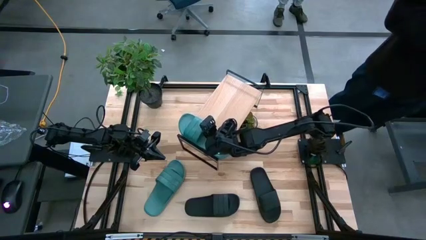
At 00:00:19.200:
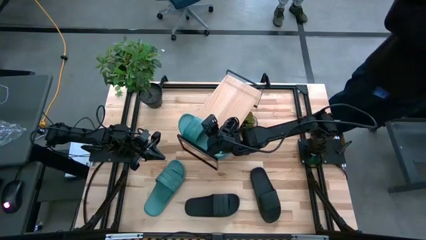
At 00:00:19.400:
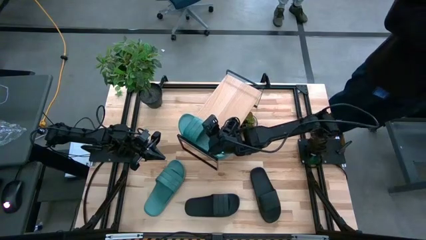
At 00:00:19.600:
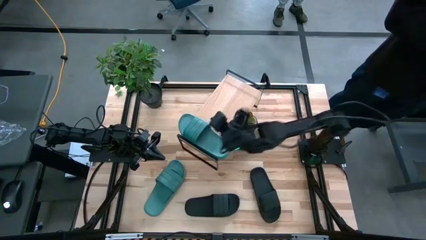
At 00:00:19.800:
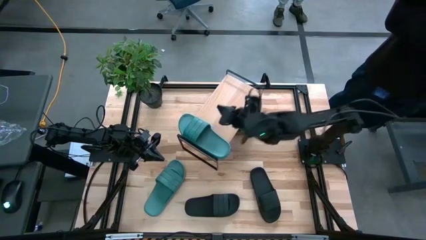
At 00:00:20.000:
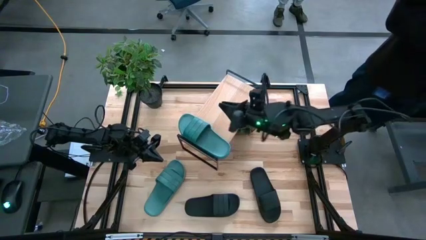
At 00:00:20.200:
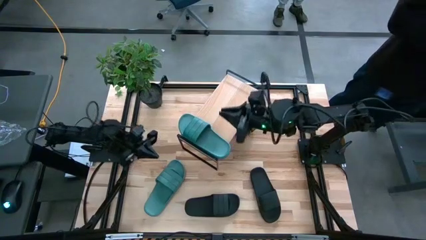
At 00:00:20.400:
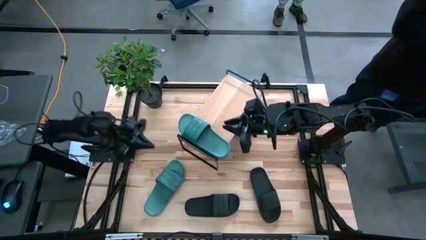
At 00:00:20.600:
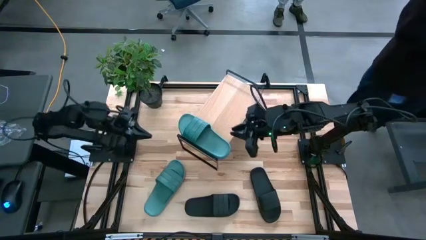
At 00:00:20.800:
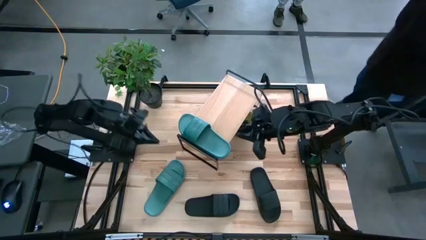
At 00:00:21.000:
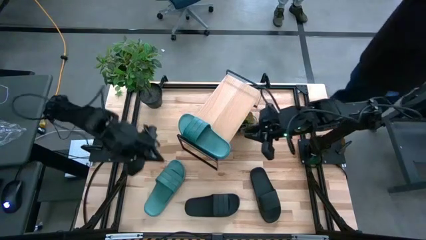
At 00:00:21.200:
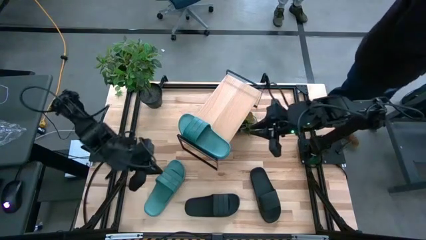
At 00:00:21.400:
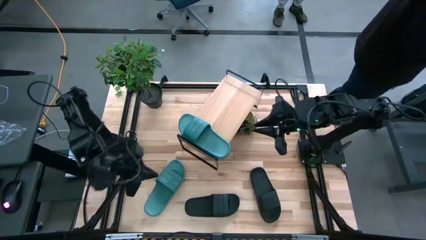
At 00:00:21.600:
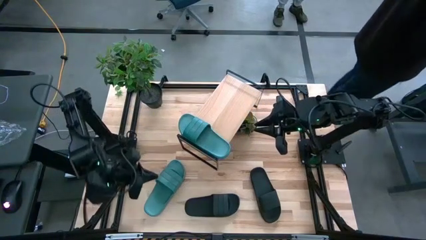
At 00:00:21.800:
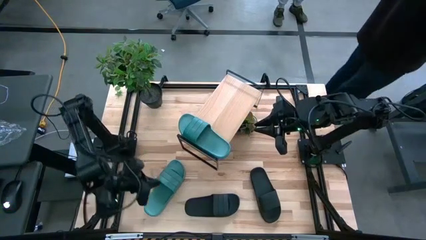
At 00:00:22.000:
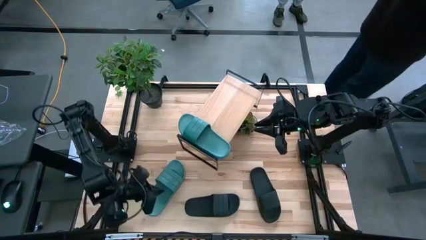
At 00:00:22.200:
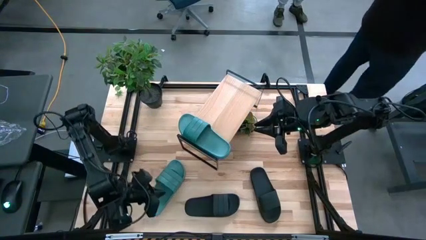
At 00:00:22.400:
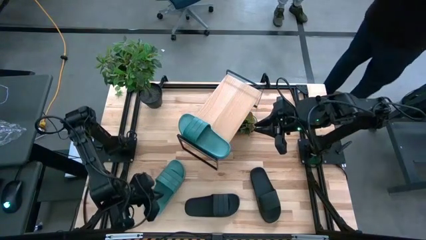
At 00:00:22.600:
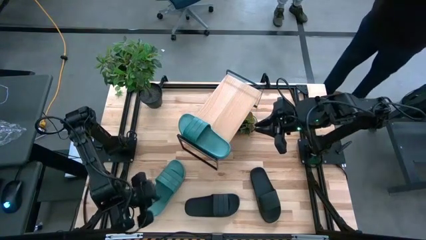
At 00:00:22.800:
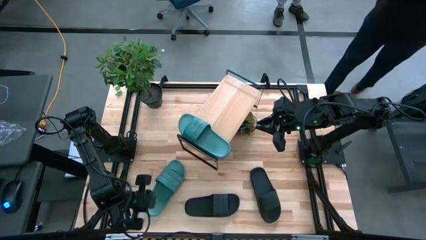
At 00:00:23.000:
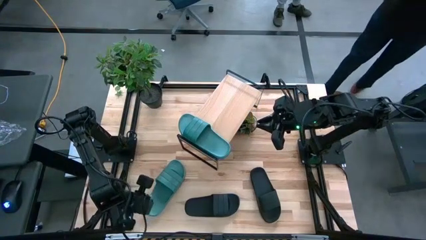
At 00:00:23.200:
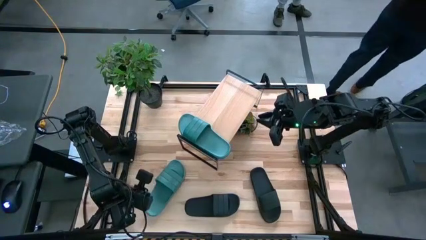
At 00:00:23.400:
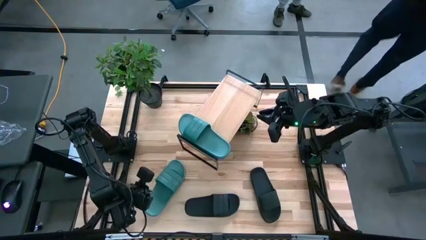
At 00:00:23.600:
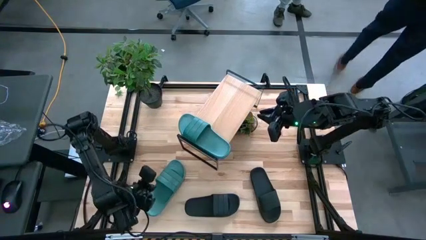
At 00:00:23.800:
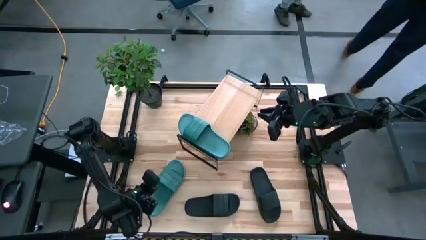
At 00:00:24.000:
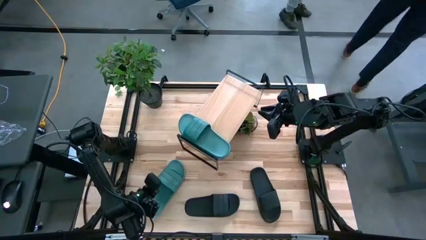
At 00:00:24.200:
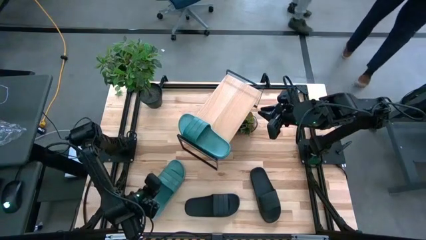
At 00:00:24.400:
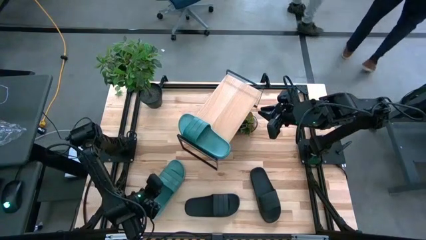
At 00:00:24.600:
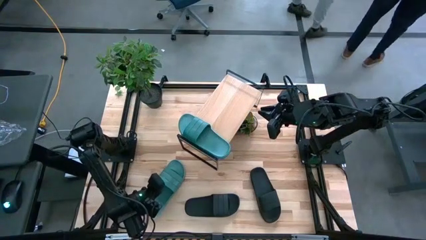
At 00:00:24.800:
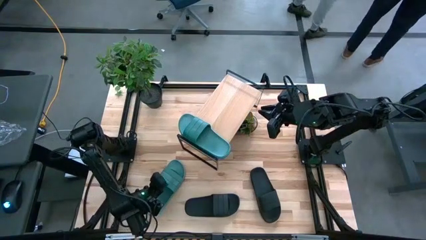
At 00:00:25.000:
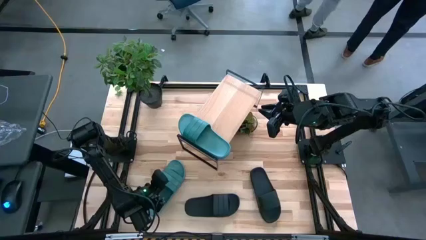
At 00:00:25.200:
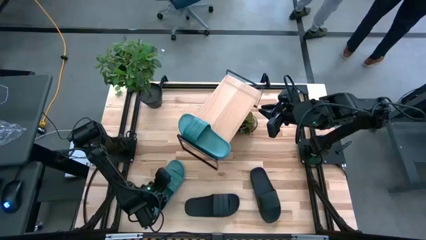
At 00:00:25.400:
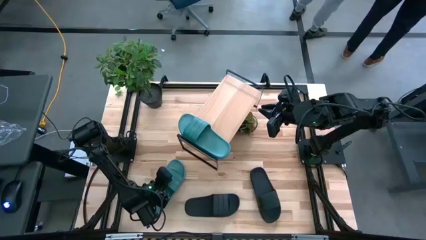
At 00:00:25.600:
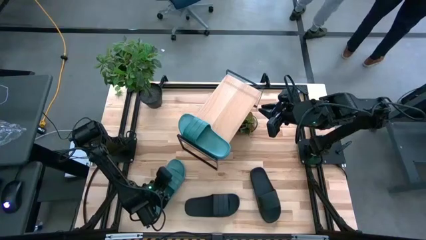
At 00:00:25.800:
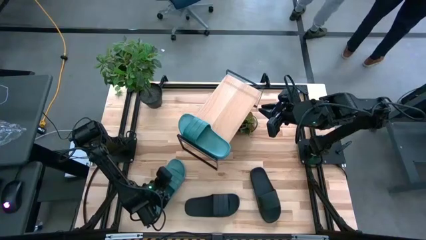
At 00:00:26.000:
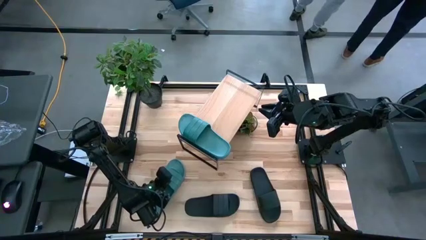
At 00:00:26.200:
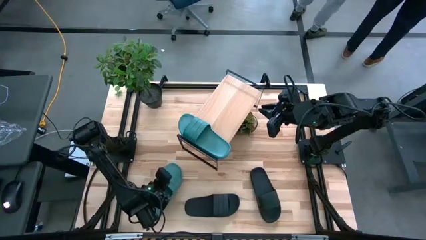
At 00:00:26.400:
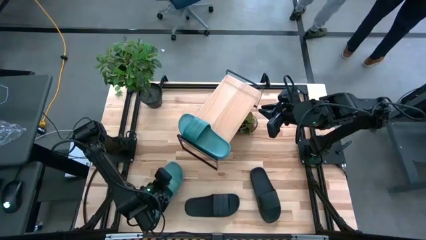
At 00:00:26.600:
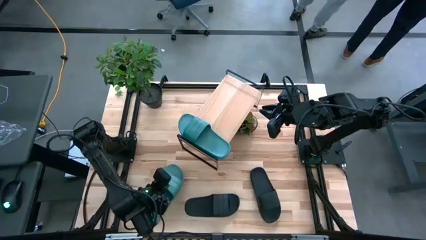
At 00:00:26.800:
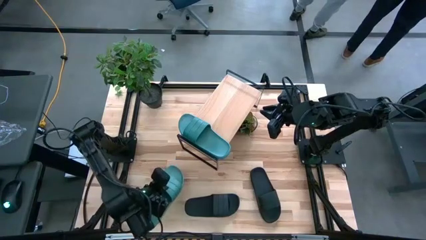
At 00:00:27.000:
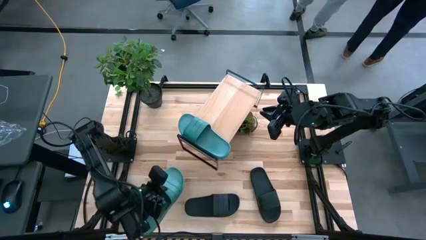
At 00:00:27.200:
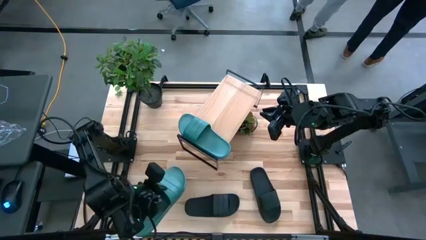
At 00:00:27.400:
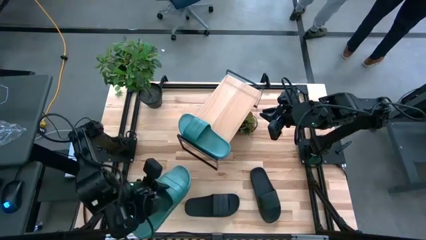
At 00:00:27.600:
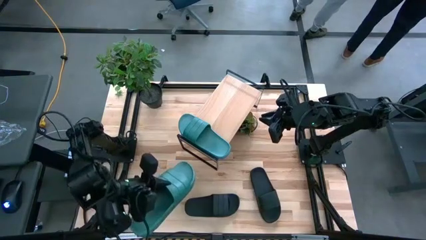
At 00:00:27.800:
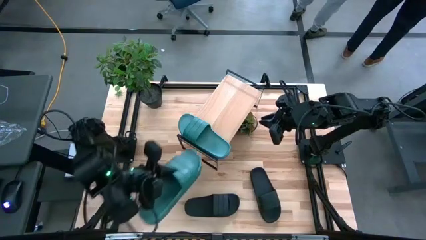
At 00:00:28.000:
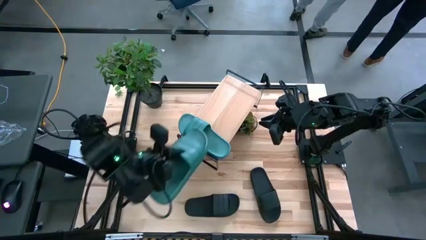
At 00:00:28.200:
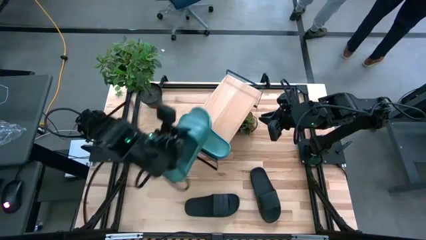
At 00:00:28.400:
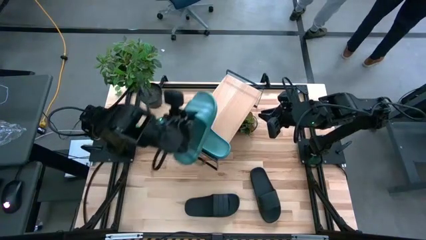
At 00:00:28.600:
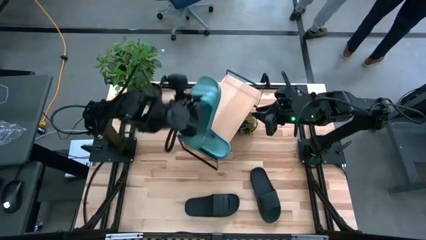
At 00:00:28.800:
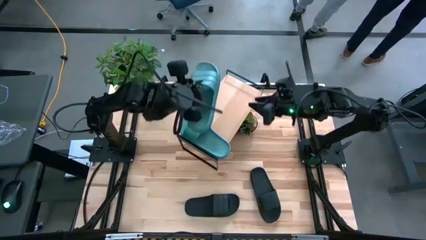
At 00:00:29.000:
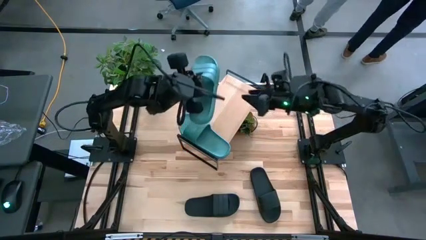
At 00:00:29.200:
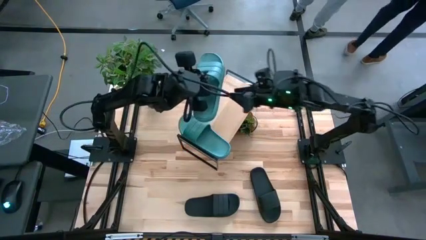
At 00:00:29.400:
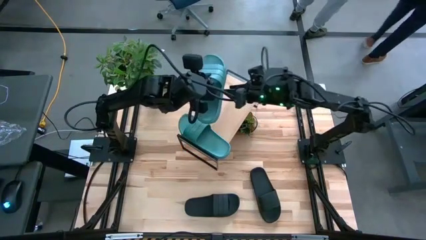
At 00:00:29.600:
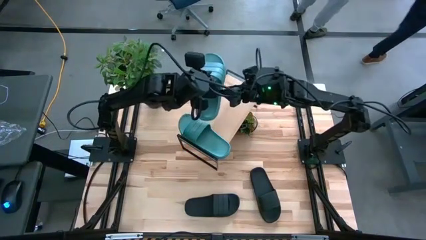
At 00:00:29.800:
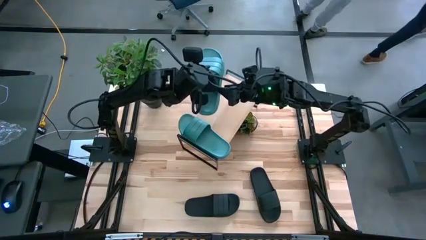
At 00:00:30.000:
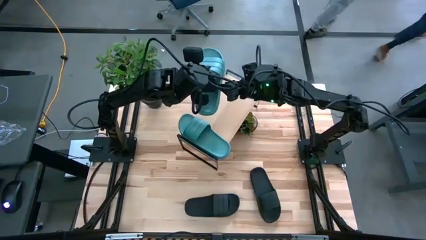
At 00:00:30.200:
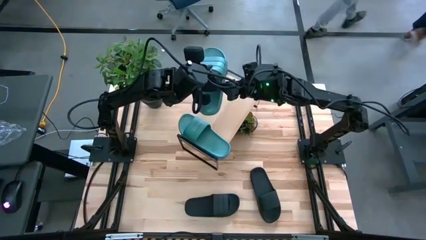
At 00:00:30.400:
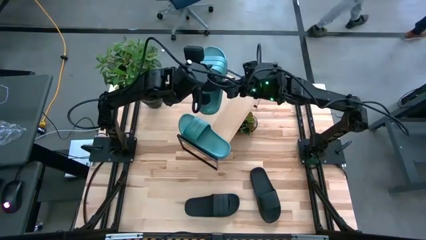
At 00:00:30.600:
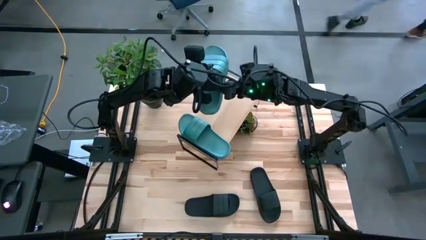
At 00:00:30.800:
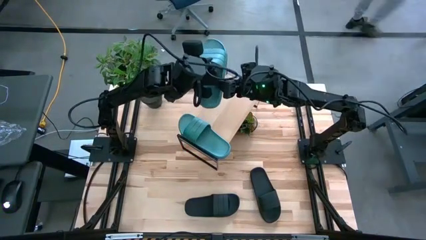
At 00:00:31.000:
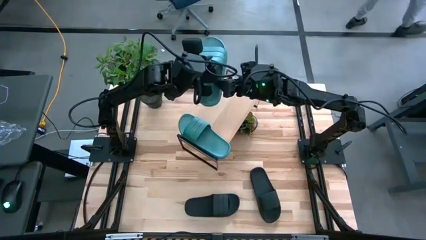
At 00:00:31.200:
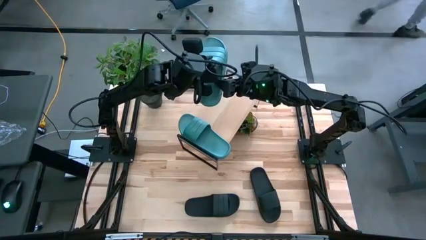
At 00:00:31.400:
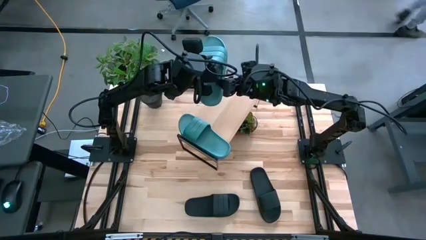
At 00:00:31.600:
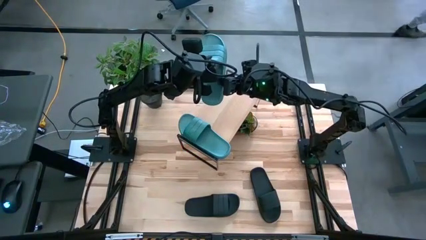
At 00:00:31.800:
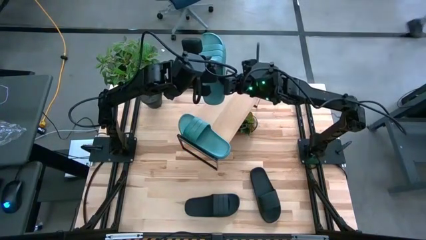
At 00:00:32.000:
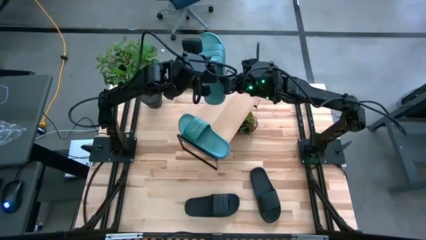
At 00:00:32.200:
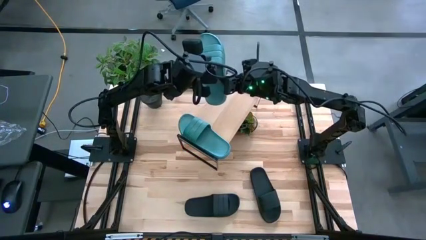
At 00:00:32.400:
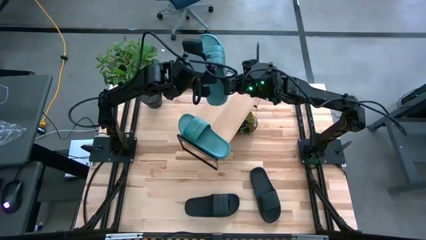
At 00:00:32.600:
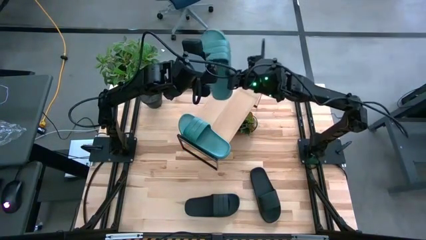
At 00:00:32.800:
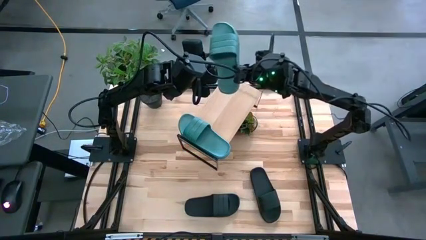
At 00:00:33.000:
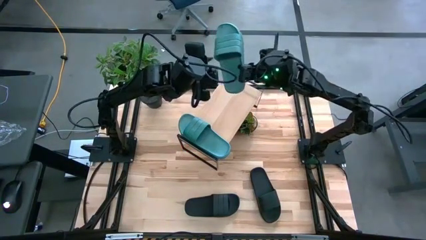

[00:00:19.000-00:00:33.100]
Task: Pick and place slides into the shelf
Put the blue slide on the shelf
